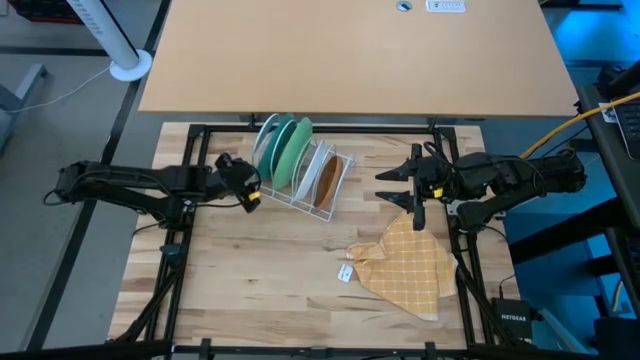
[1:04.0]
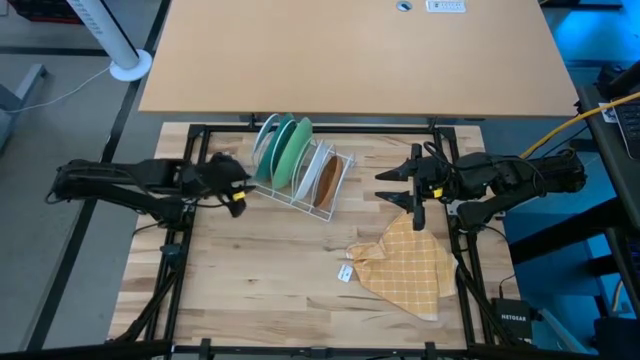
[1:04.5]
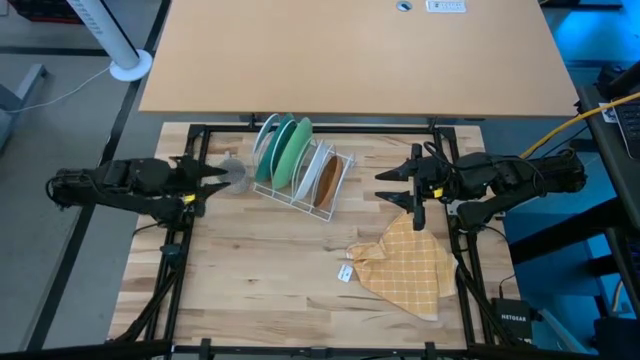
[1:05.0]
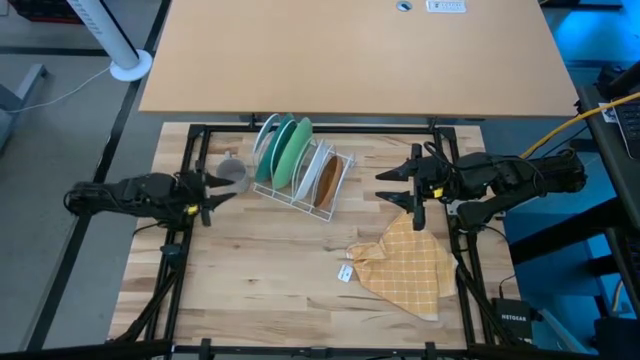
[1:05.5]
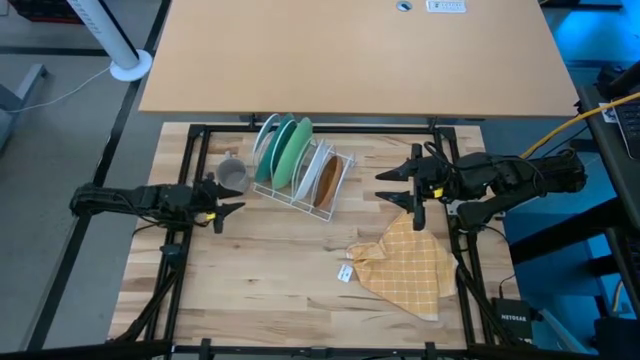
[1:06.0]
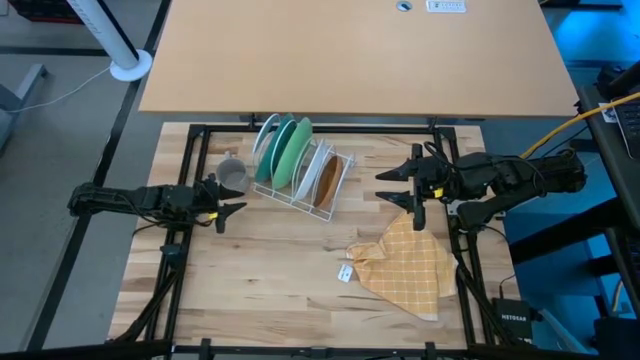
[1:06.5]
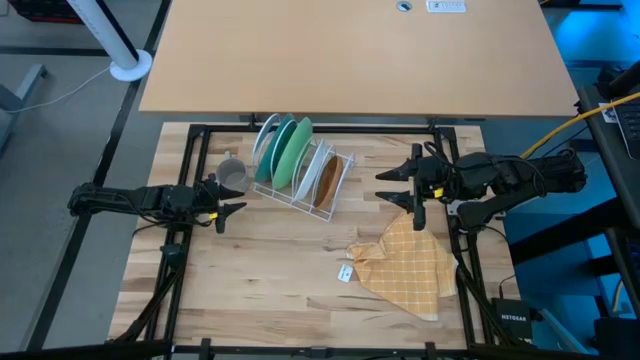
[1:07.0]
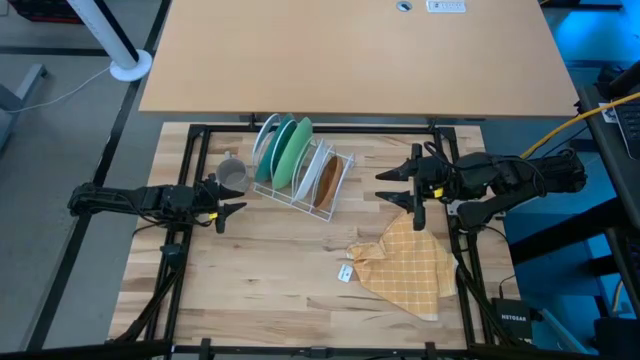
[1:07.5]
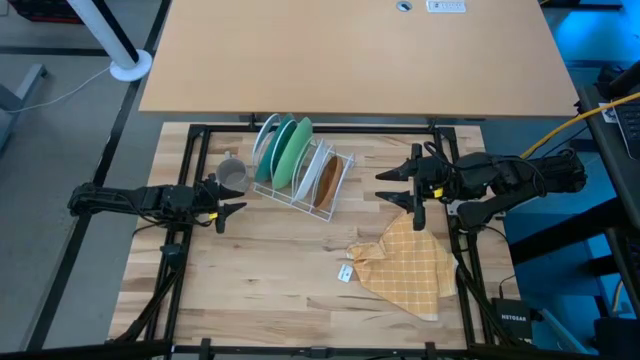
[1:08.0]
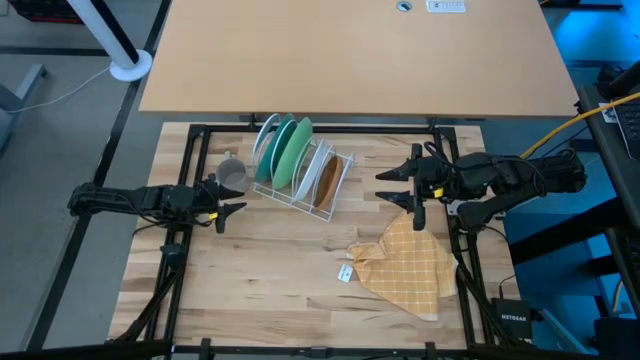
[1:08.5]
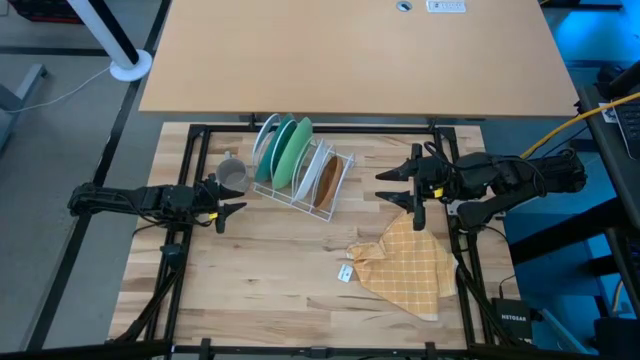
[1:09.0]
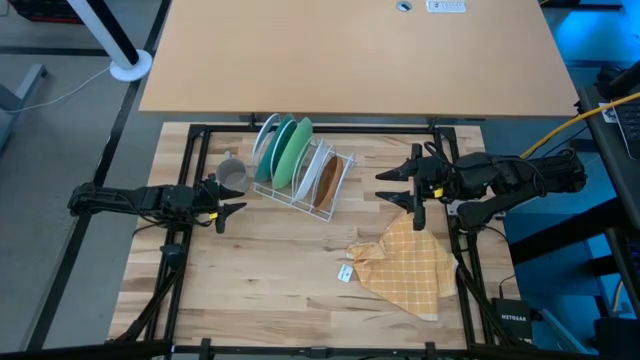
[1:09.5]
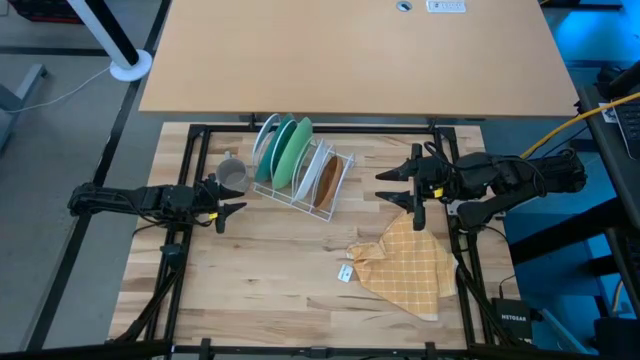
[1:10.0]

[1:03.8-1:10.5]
Task: Sort dishes
Return to Home Position

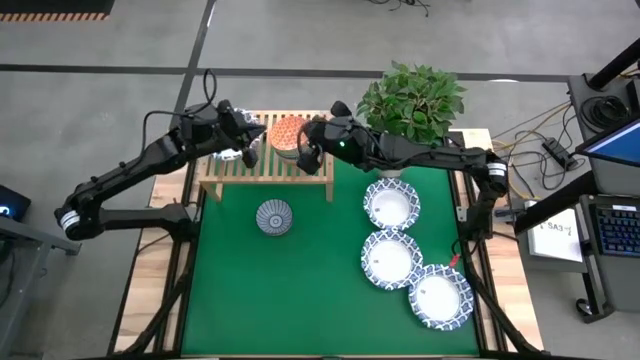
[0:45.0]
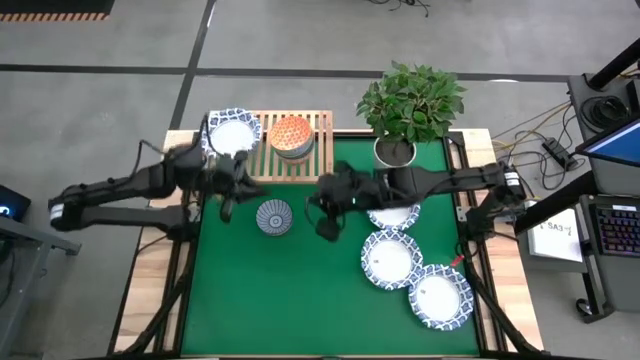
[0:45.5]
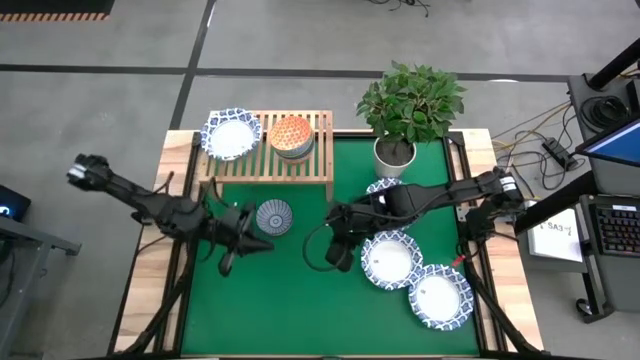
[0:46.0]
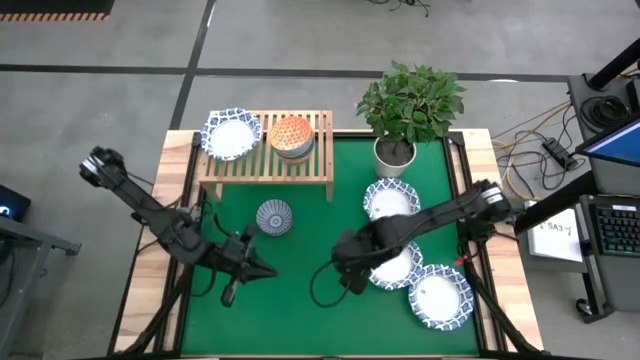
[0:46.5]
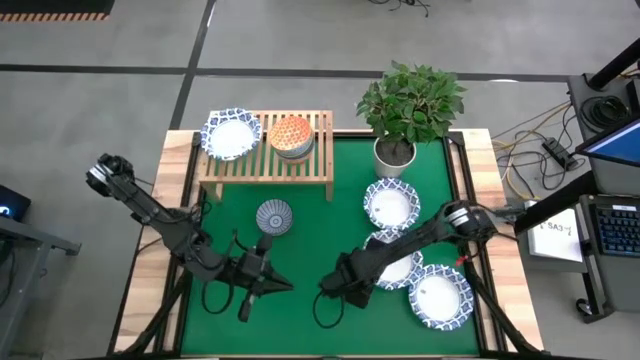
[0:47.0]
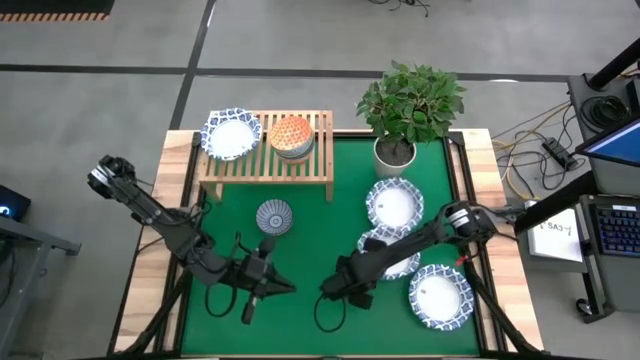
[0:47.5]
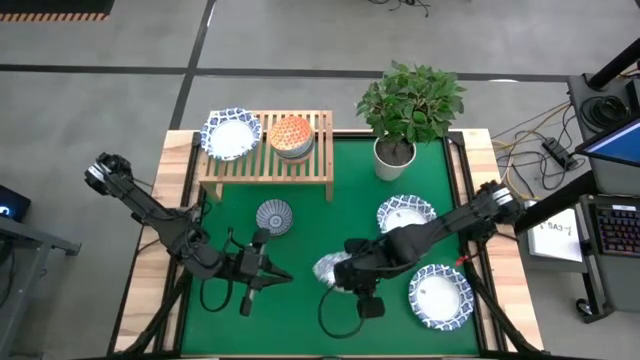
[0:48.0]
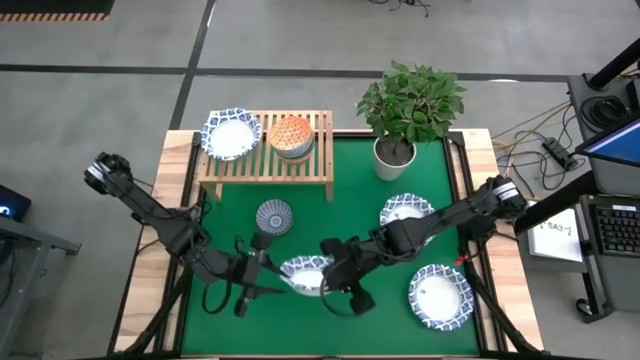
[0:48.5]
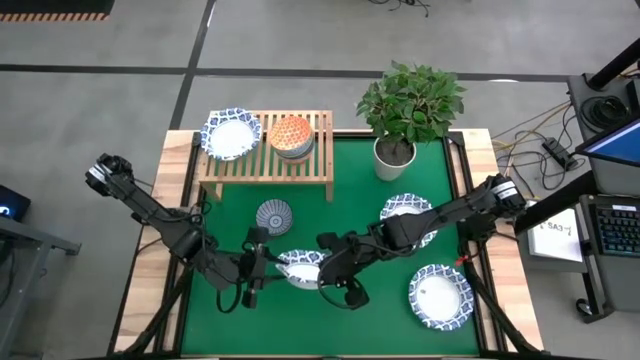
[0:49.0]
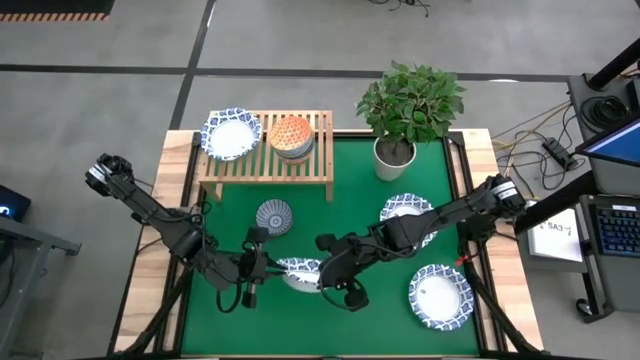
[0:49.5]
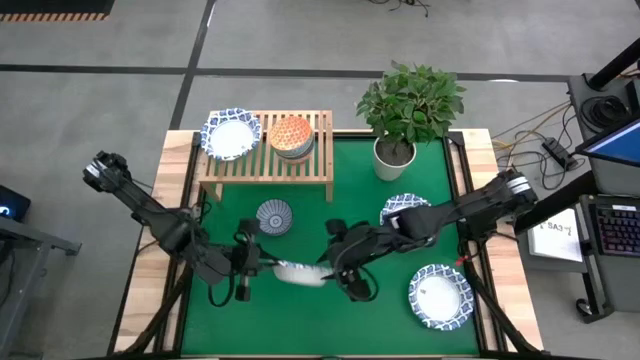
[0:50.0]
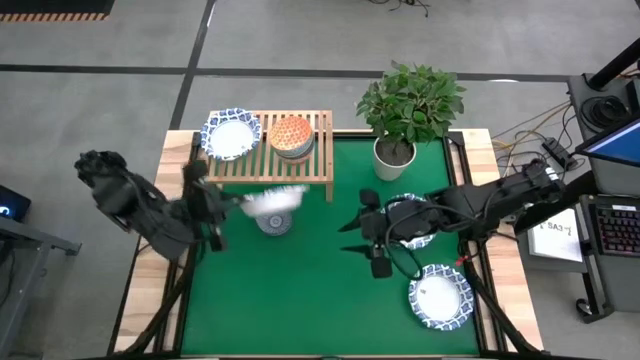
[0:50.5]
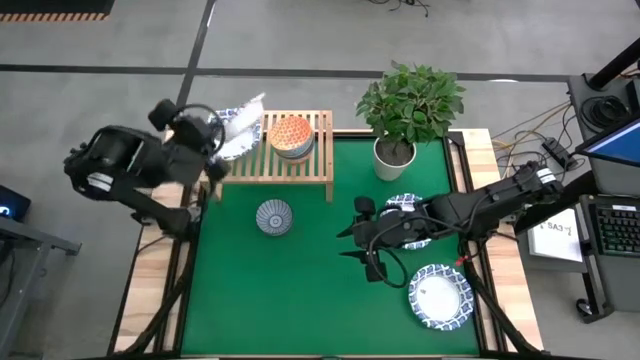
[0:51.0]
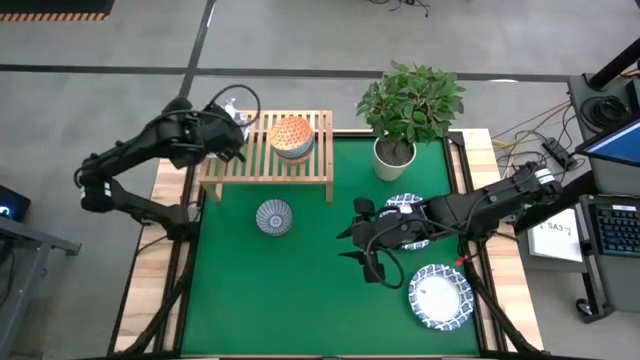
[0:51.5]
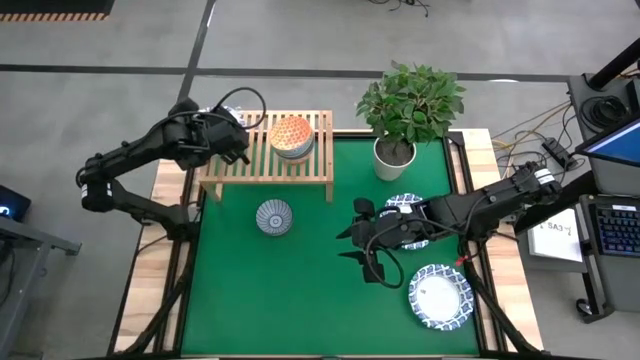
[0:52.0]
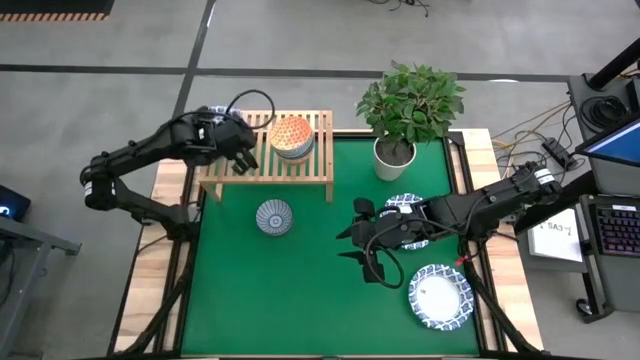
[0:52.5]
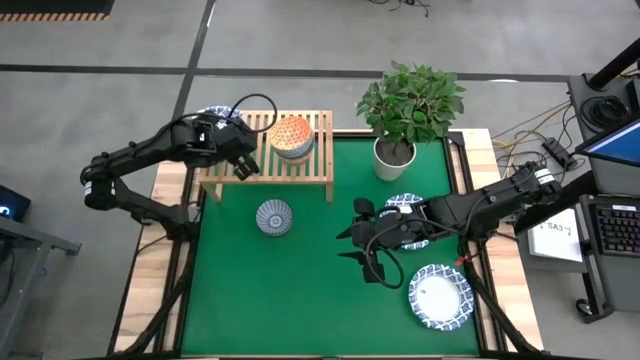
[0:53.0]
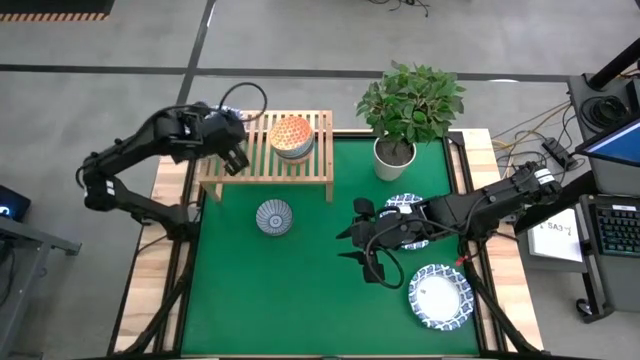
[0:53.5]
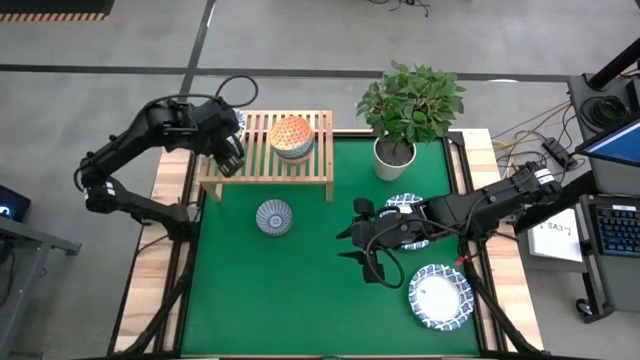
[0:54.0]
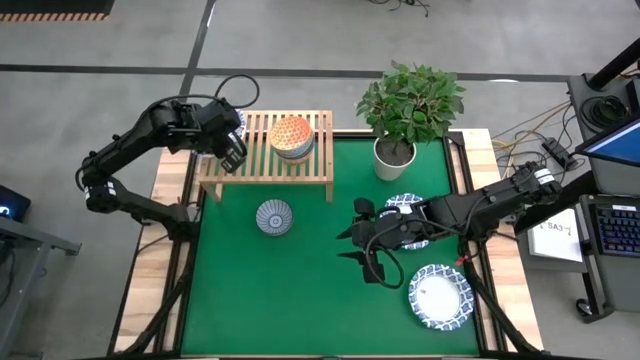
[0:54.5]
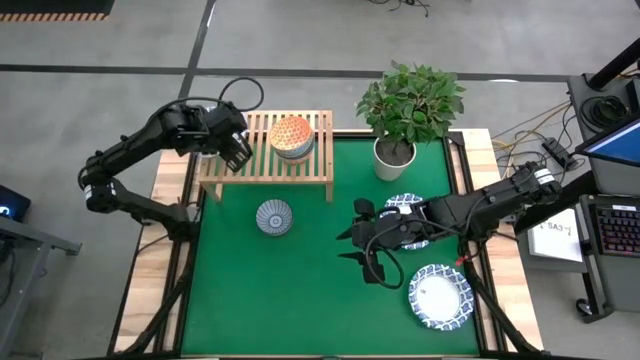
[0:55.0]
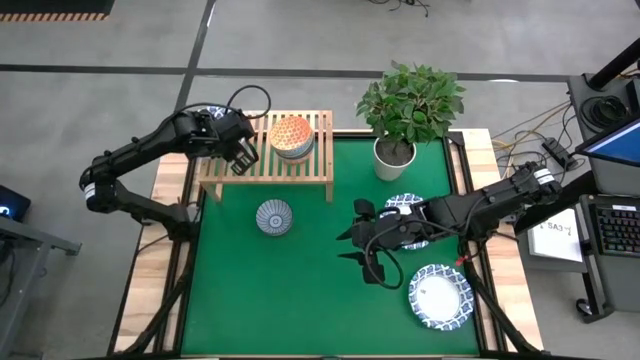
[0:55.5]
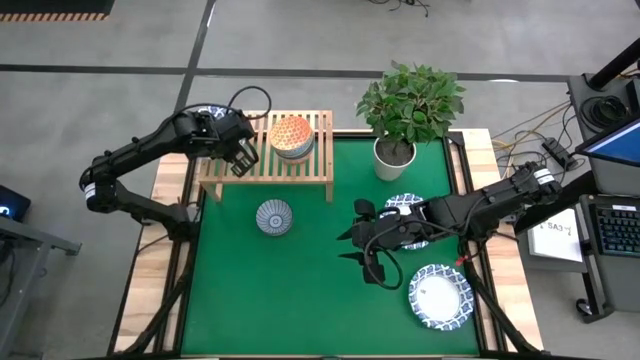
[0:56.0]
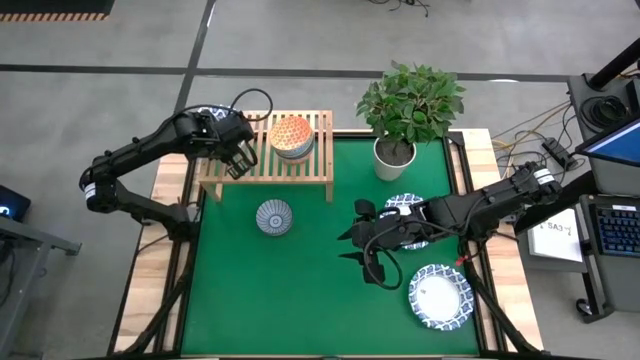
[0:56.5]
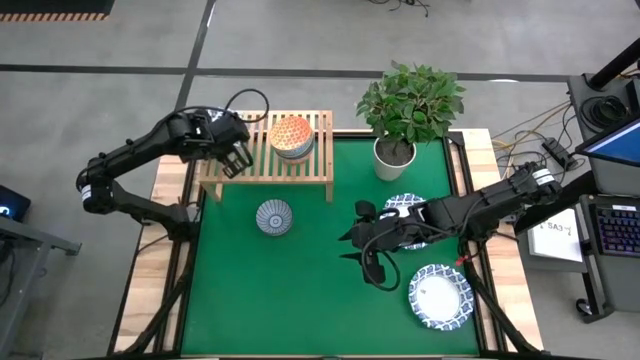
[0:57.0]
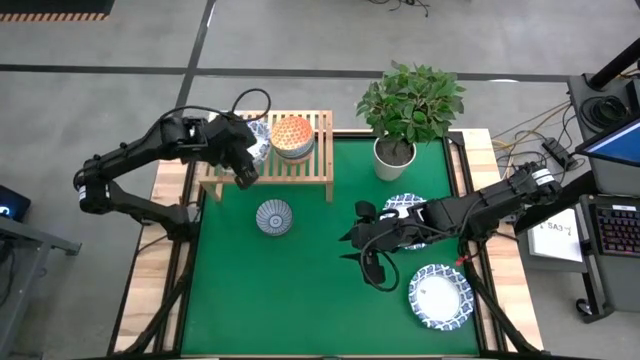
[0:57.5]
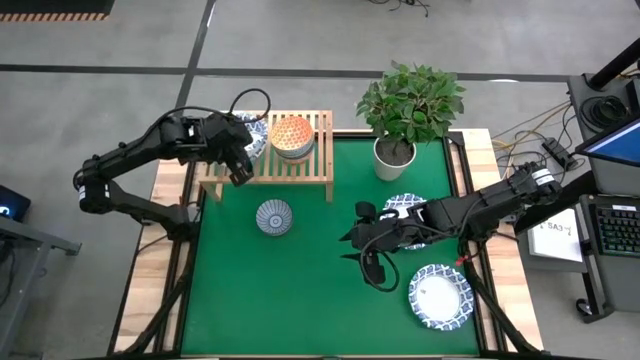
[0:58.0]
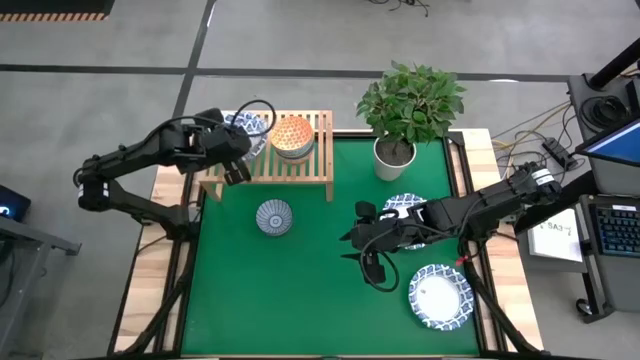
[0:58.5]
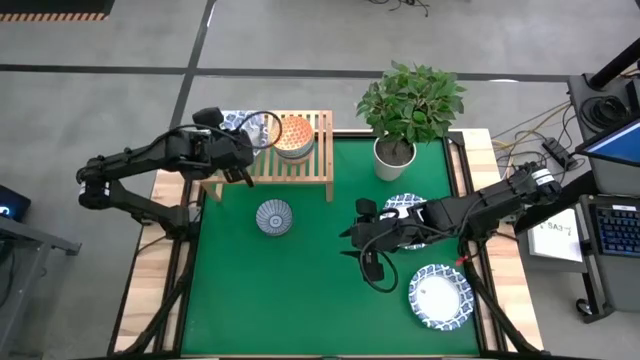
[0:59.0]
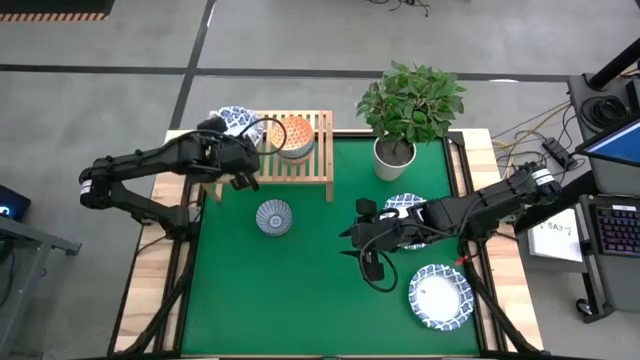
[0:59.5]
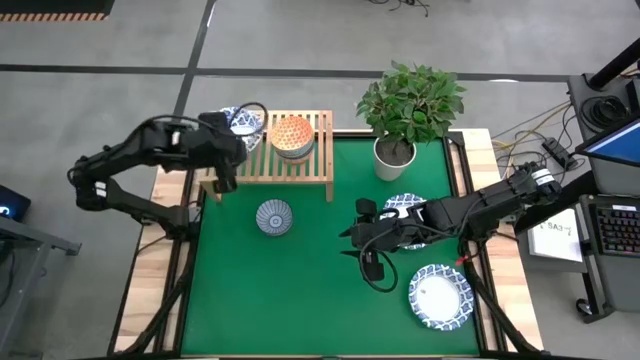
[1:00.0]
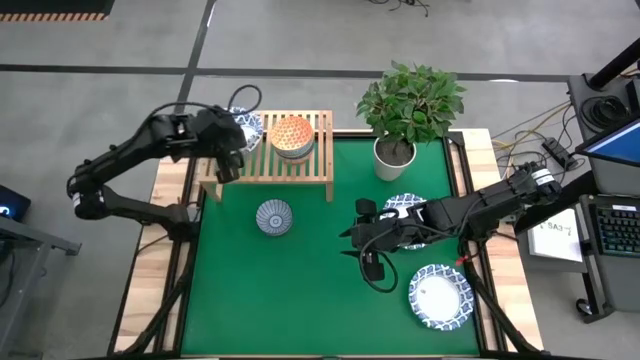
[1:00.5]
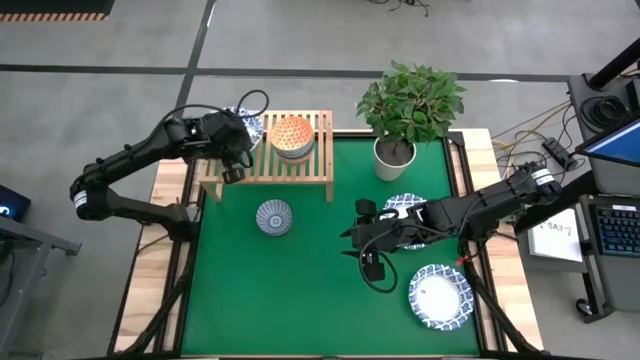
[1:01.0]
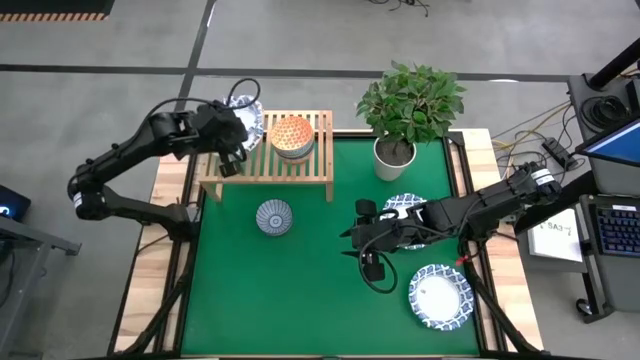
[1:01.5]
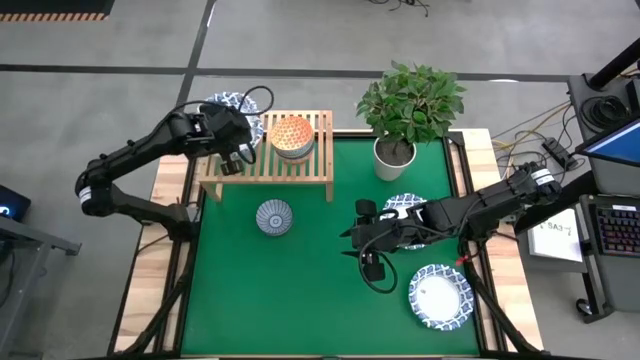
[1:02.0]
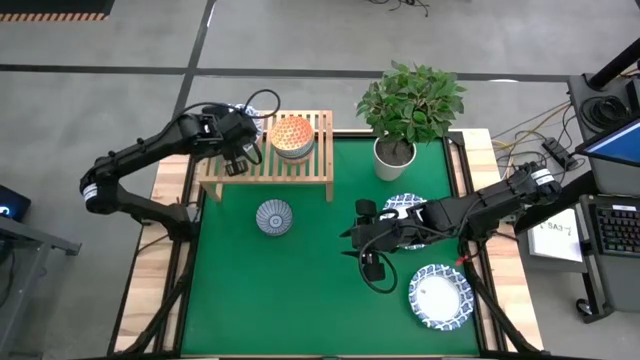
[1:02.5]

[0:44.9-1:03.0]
Task: Place and stack bowls onto a shelf
Stack the center white bowl on top of the other white bowl on the shelf
